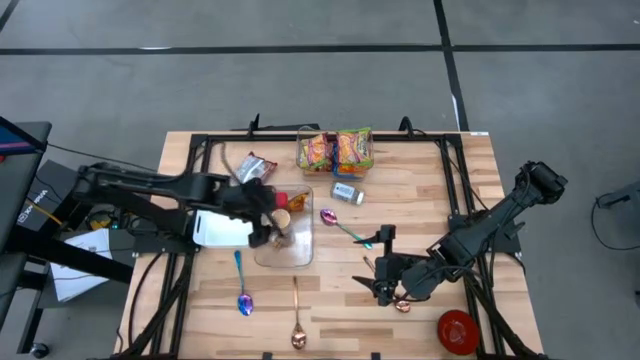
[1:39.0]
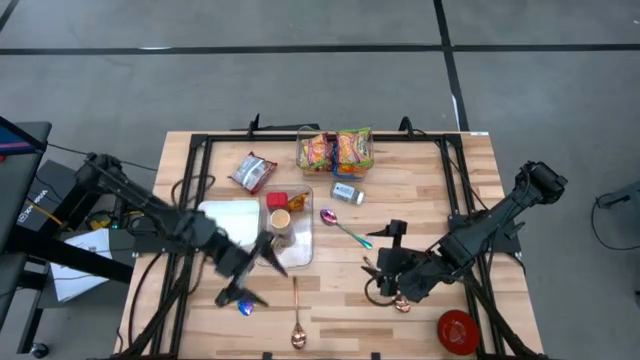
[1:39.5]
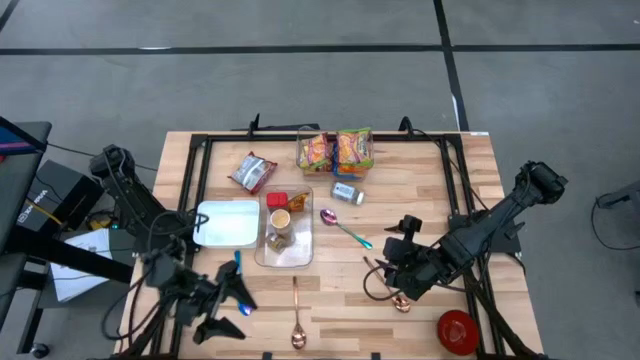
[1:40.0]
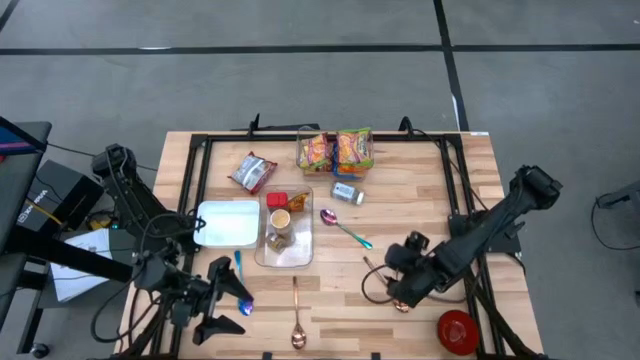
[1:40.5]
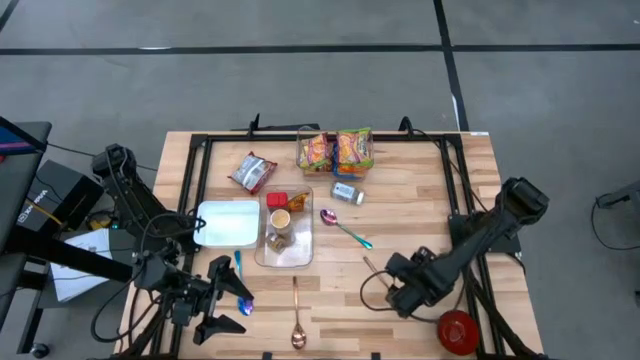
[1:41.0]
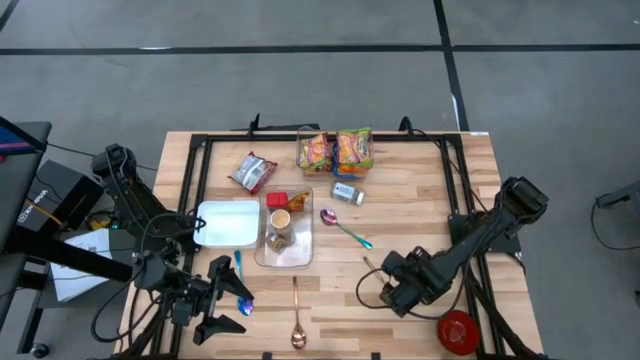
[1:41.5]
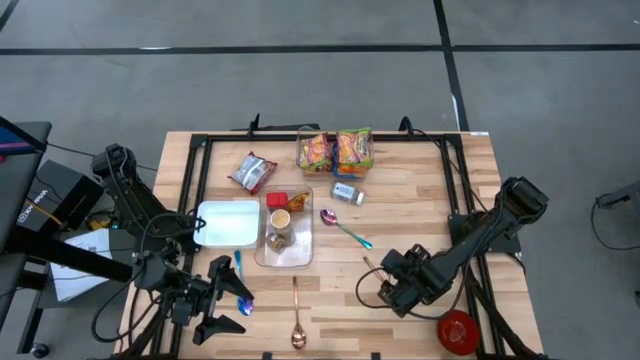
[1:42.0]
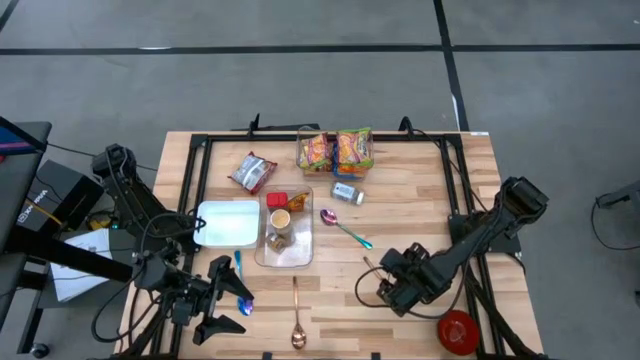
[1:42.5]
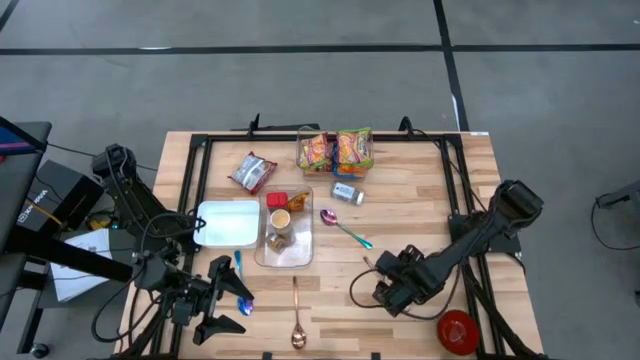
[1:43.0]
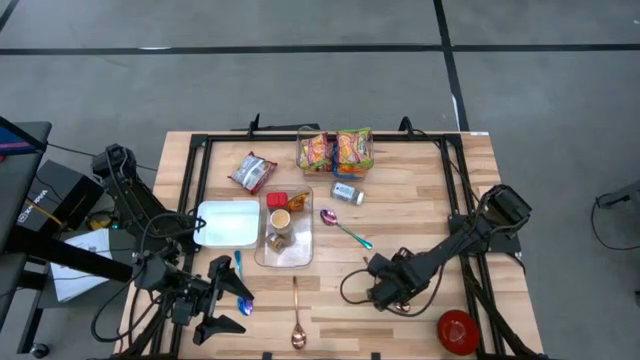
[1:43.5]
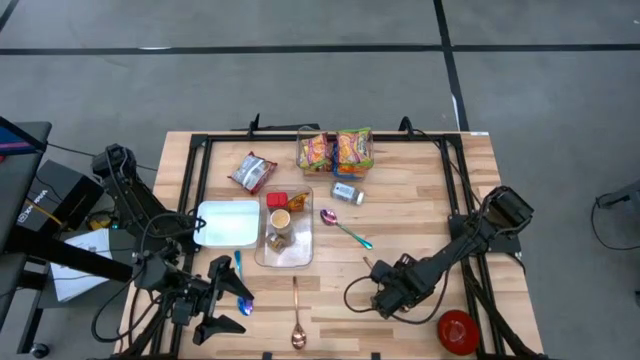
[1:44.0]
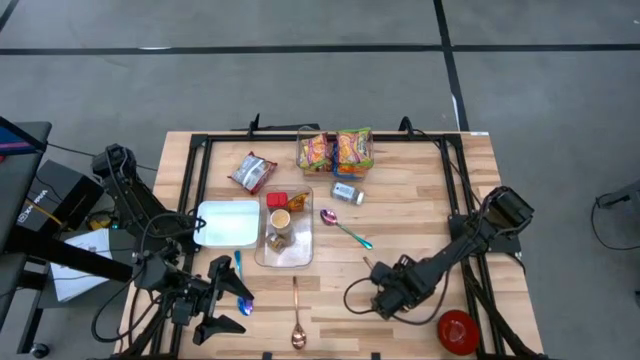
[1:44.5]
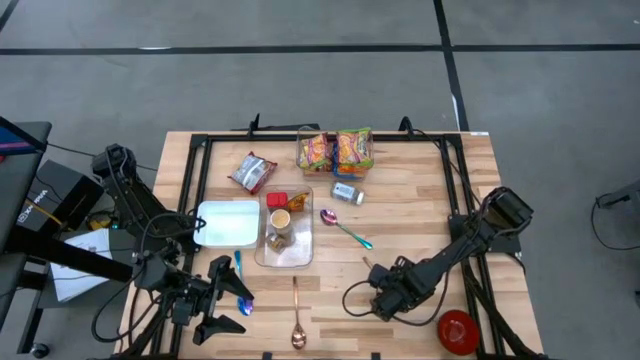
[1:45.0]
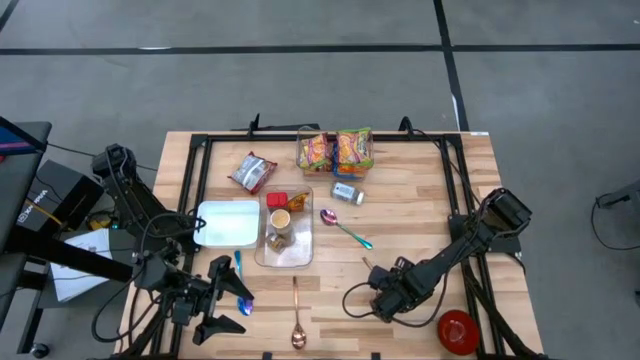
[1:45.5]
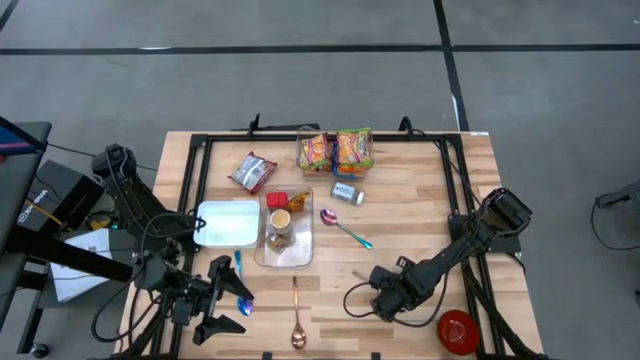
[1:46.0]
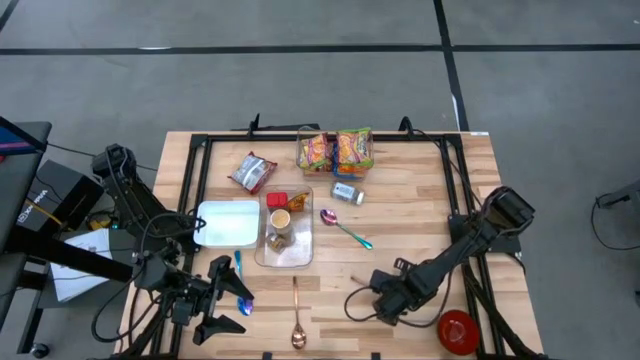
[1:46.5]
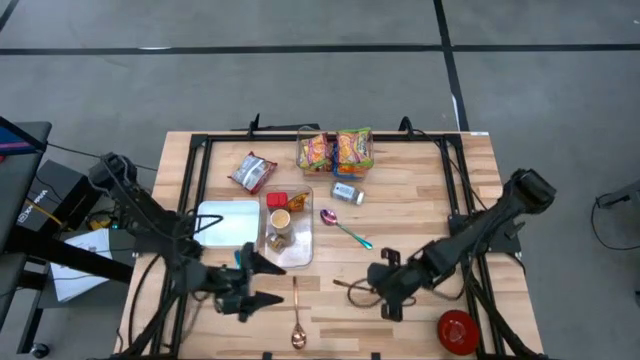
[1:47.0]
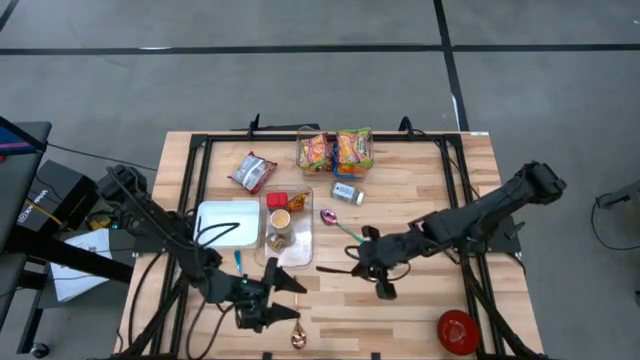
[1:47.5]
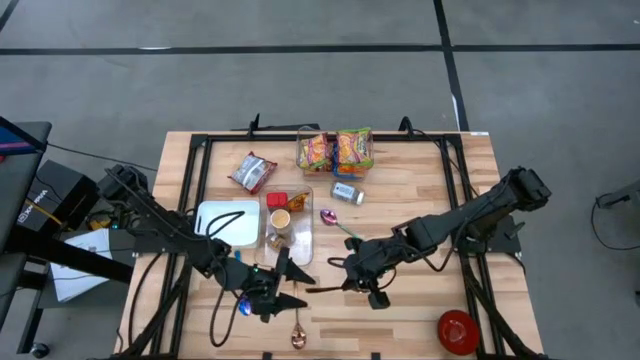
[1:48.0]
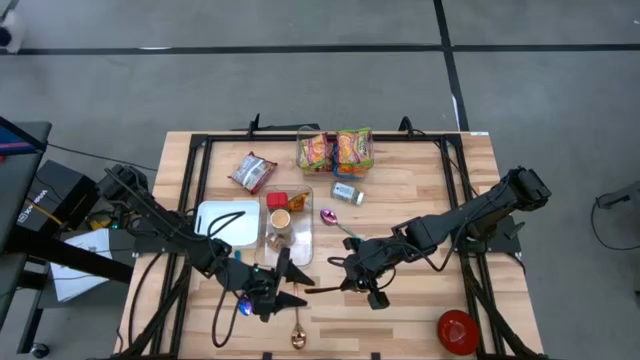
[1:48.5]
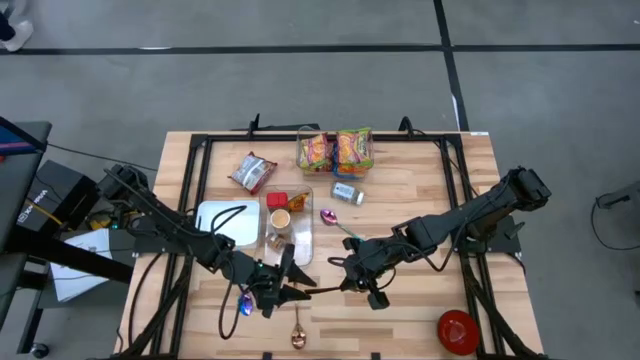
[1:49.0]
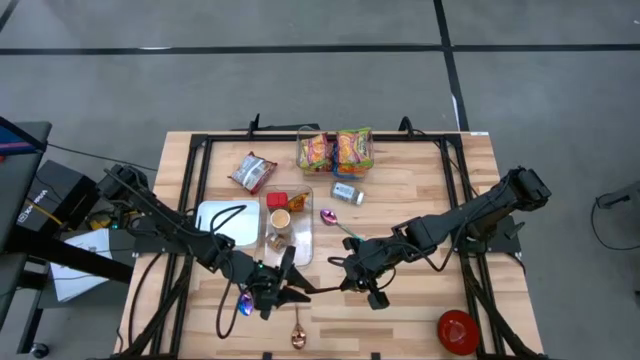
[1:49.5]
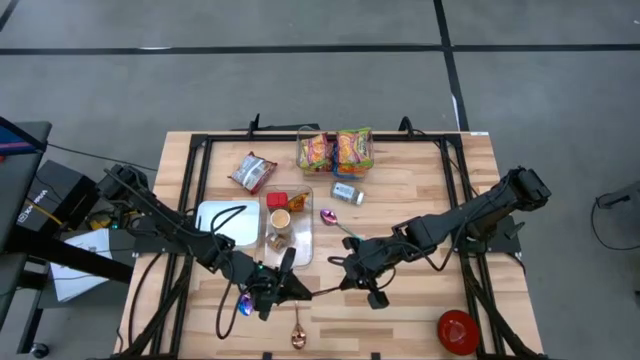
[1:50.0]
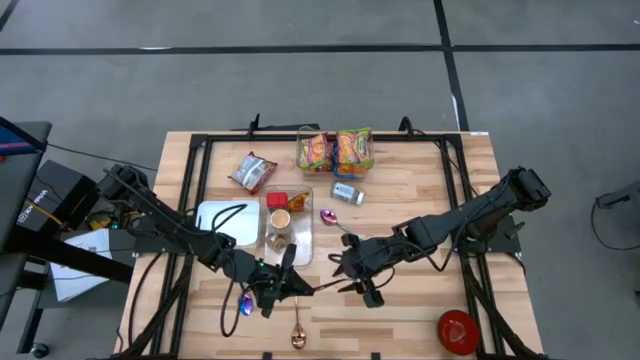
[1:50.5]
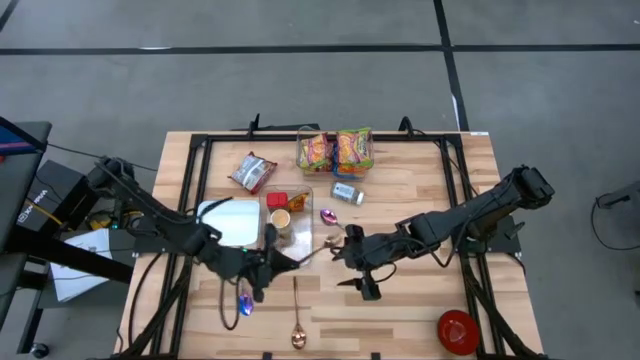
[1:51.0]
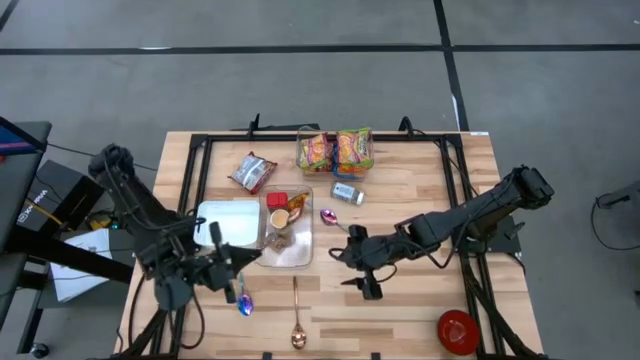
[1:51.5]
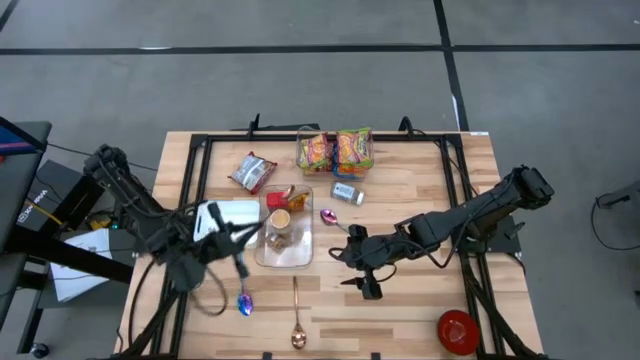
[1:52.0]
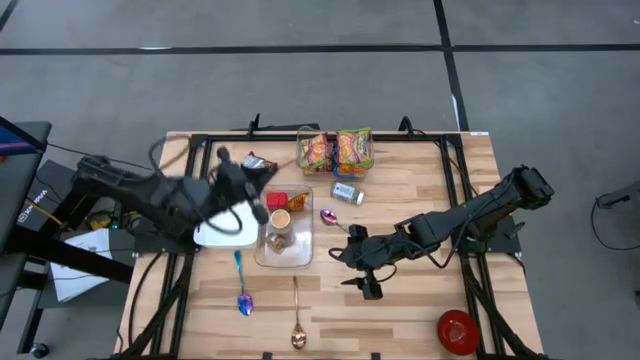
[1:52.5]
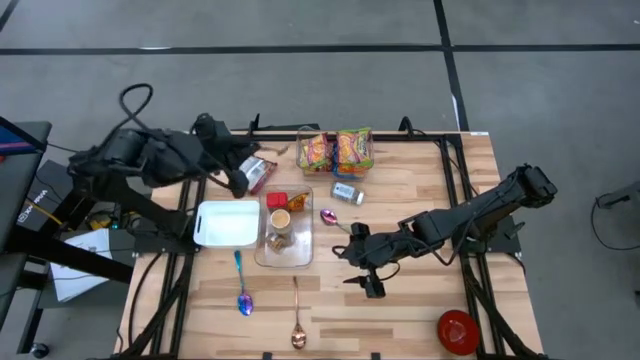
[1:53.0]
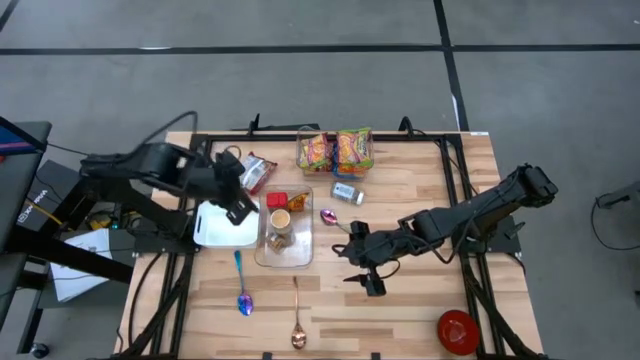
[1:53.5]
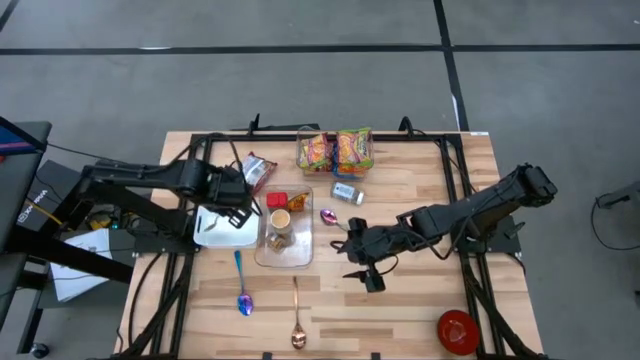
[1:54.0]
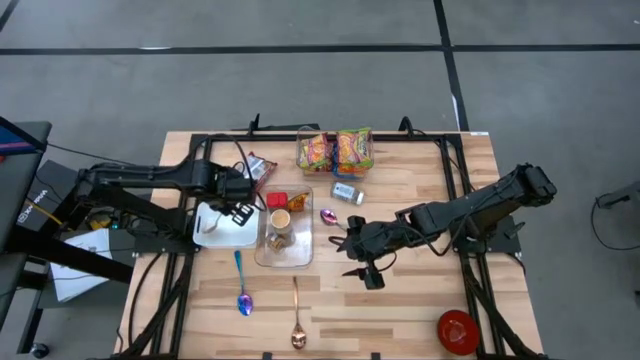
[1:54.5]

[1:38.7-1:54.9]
Task: Pick & Place Food Item
Put the right gold spoon into the white bin

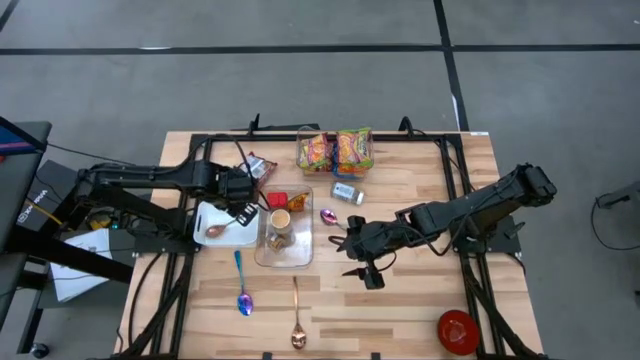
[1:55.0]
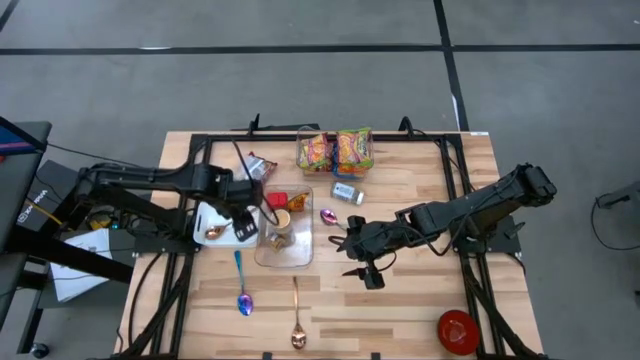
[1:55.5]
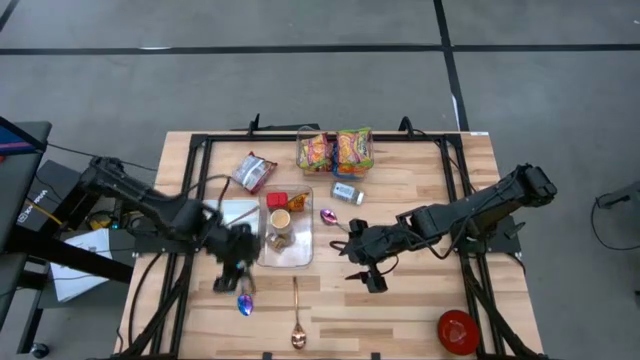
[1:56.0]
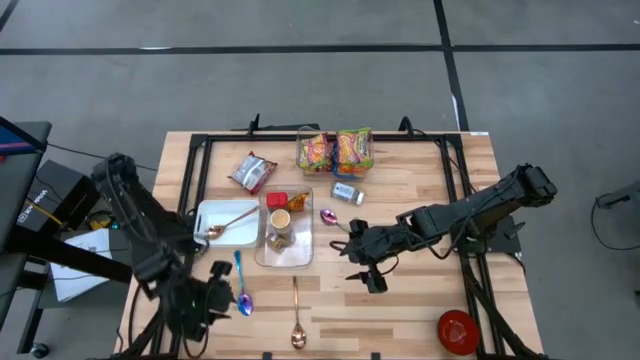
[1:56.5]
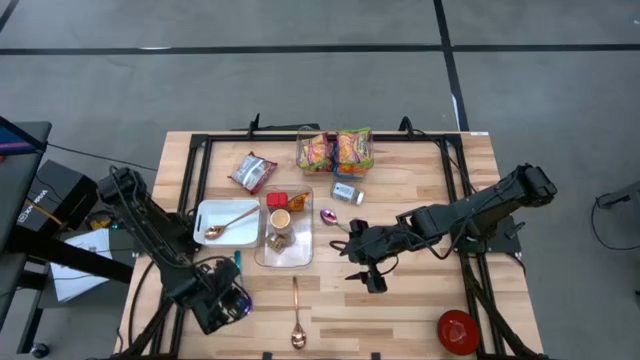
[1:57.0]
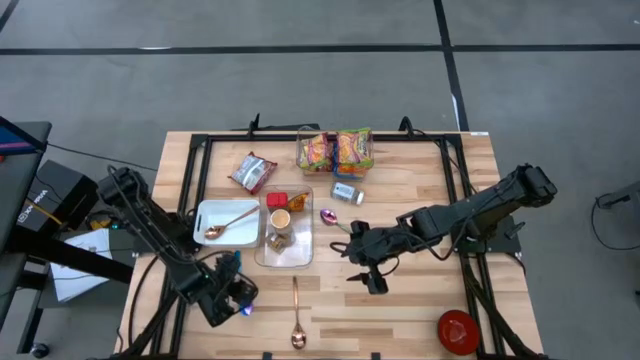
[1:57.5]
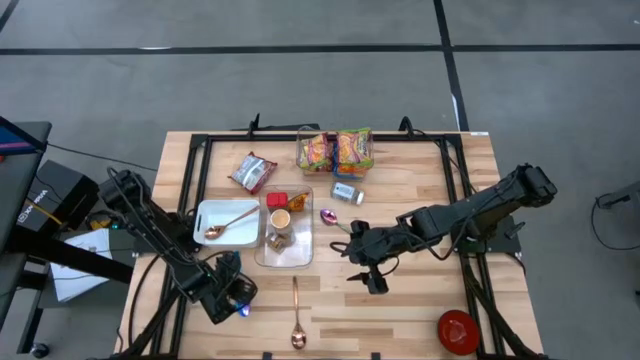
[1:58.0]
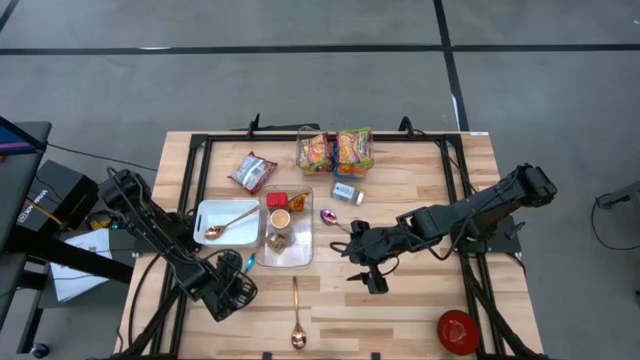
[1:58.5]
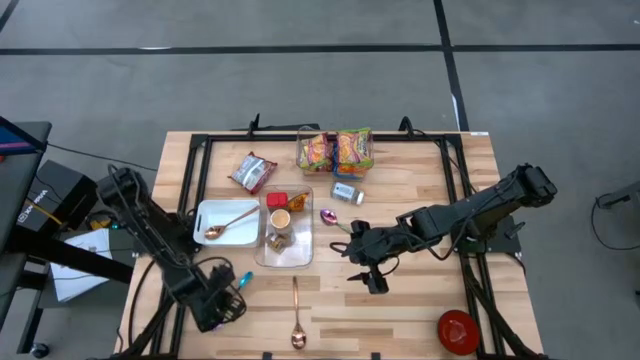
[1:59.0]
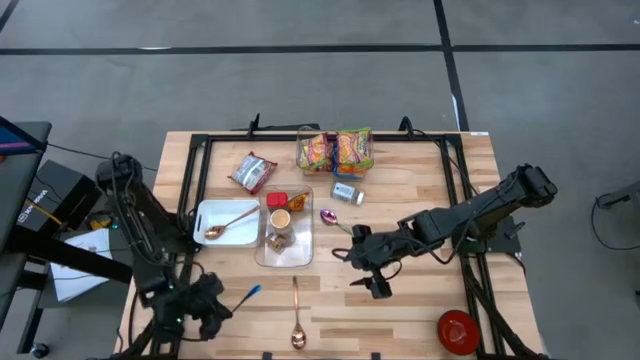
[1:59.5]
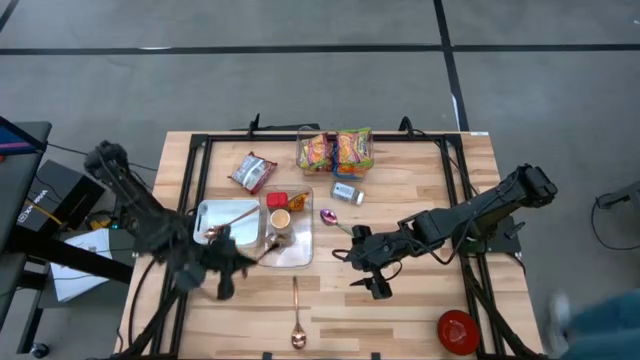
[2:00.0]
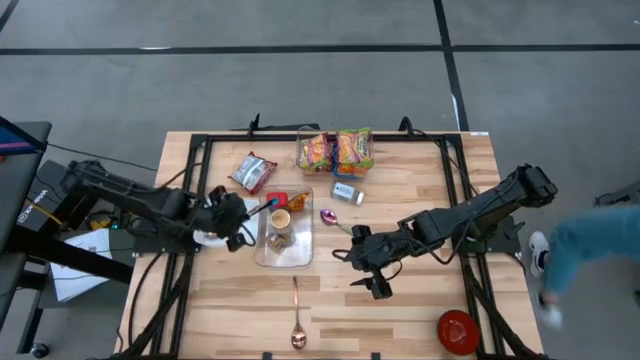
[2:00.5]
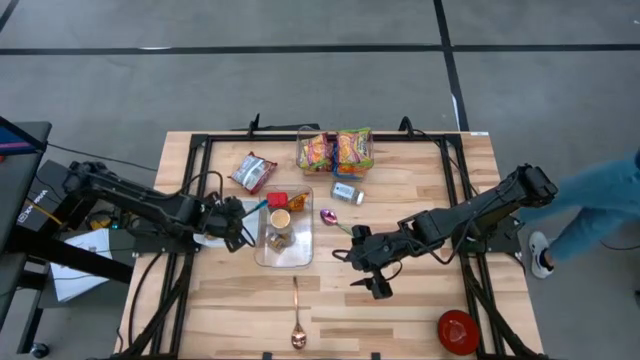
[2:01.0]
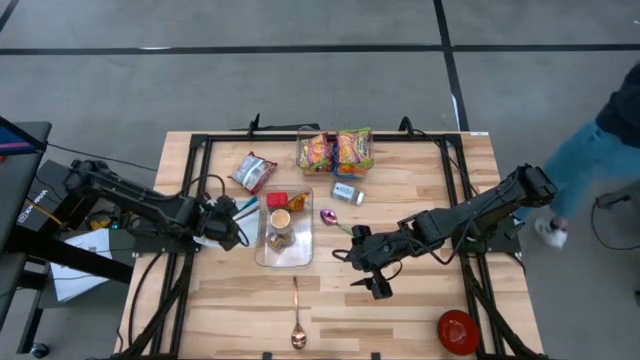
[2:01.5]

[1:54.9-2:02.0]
Put the right blue spoon into the white bin
